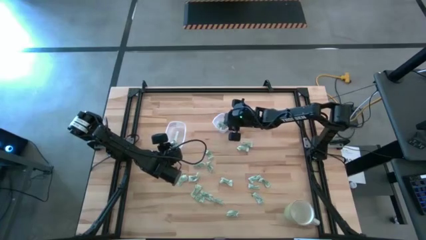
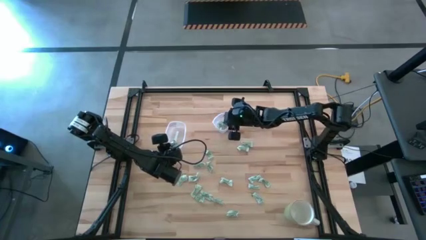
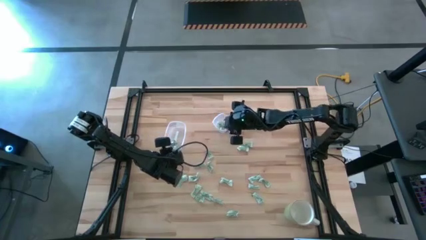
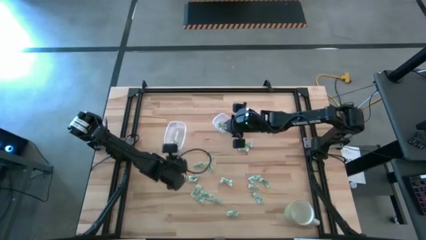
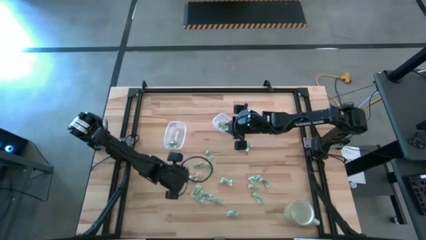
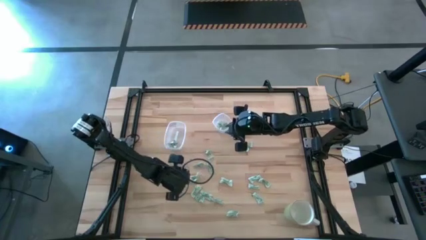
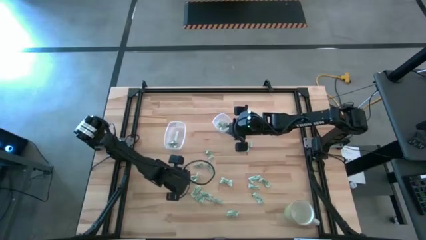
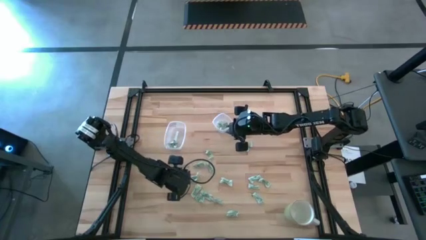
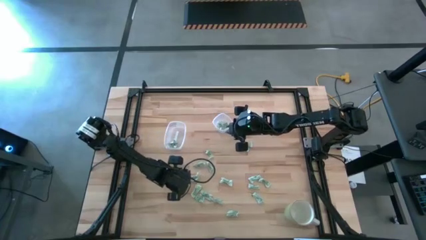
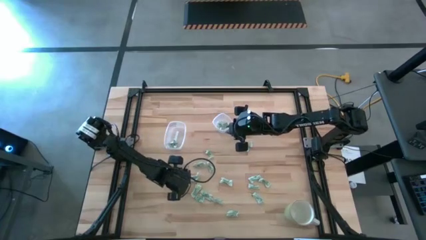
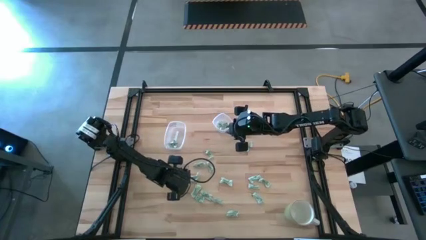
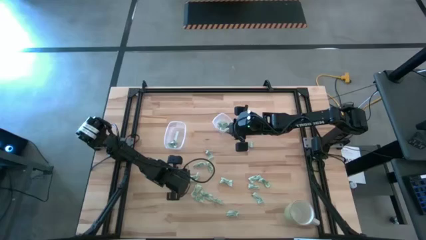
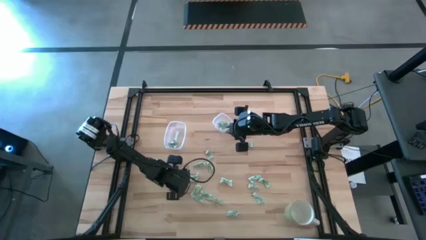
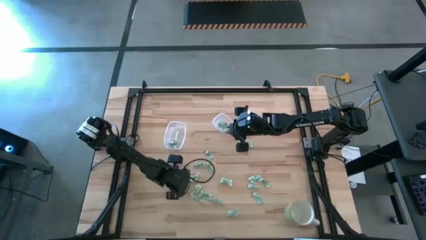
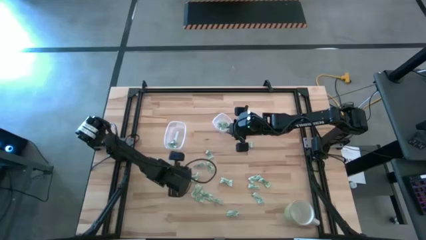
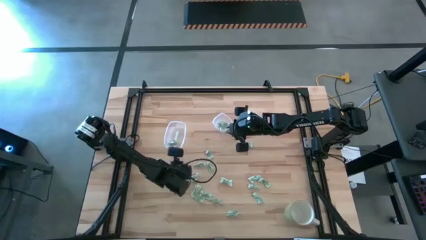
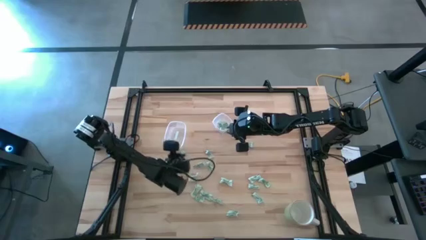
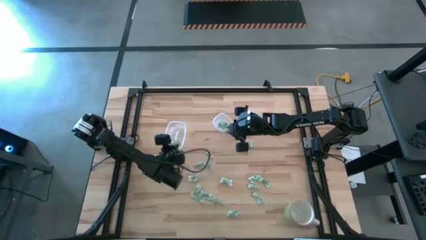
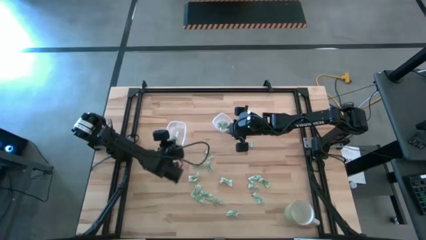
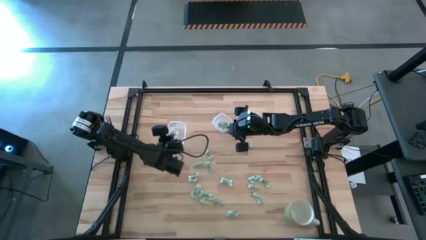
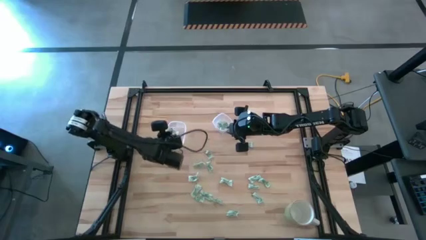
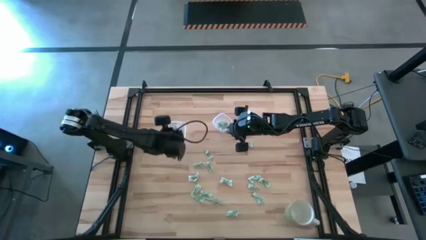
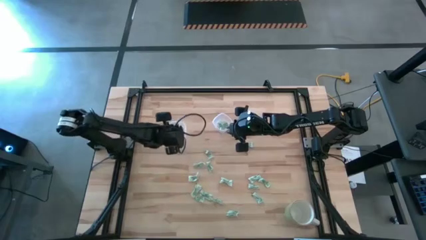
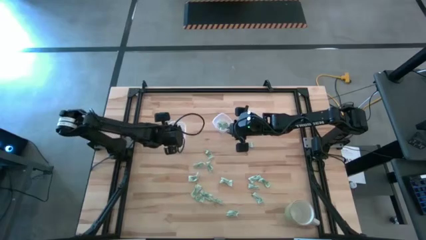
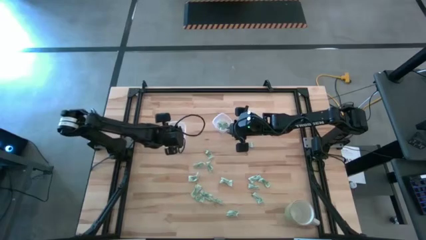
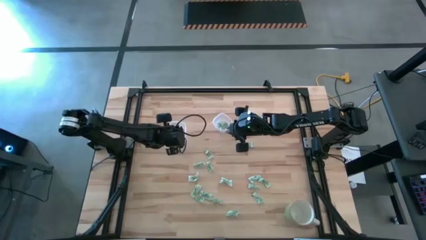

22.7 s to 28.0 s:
Task: Pick and place items into bin
Put the stevia packet into the large transparent container

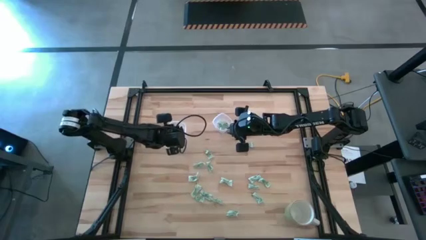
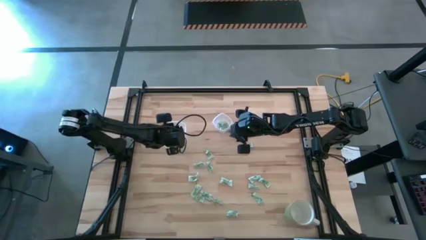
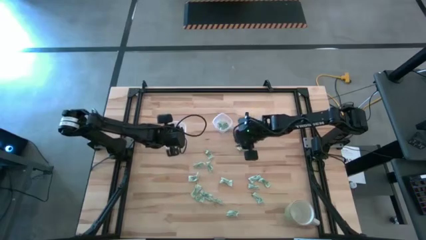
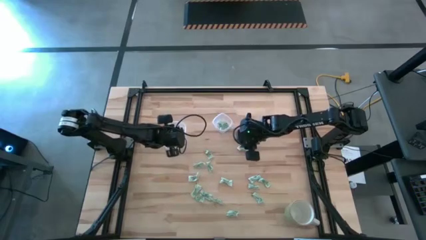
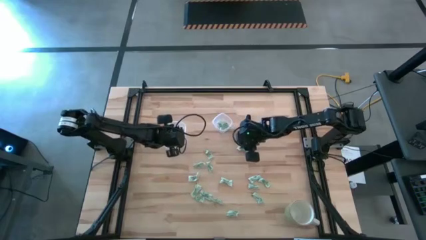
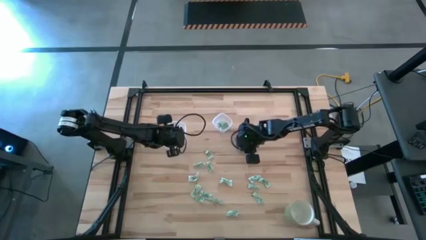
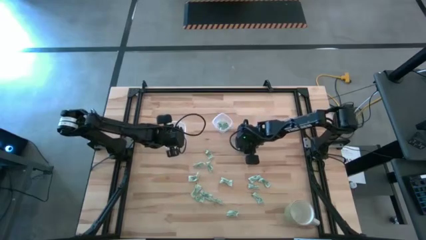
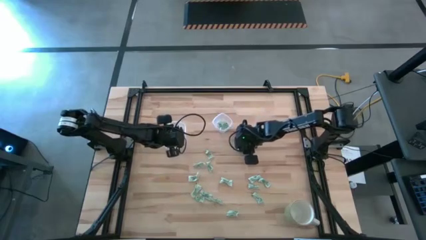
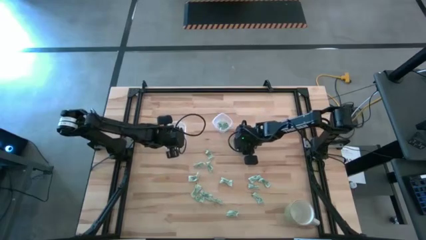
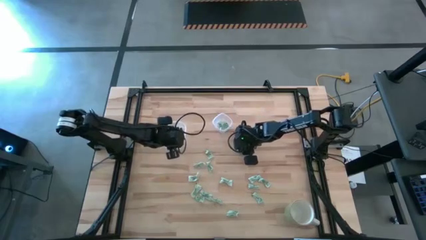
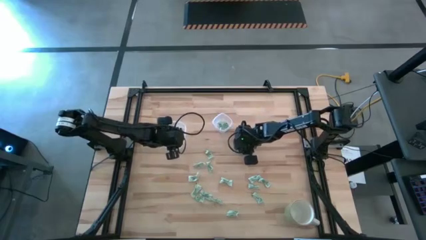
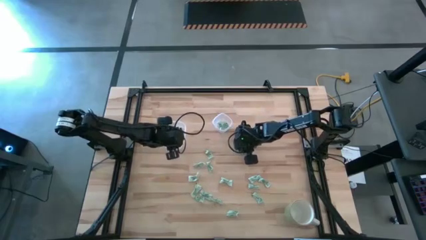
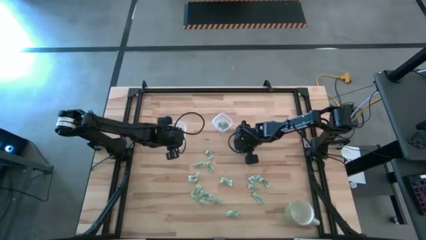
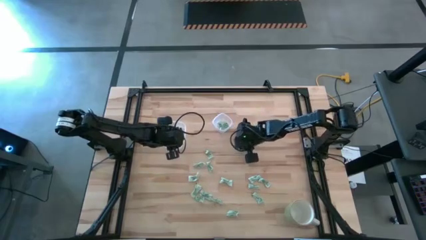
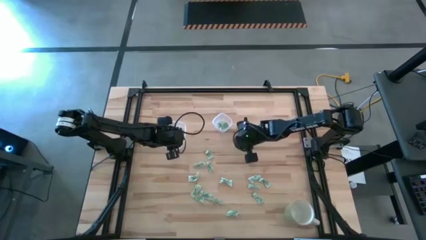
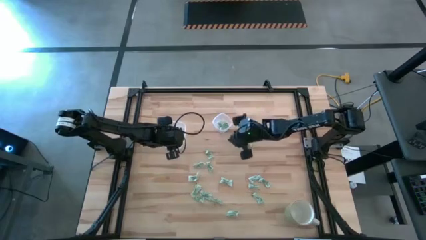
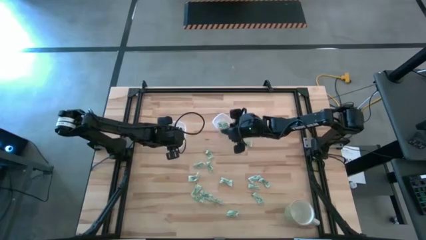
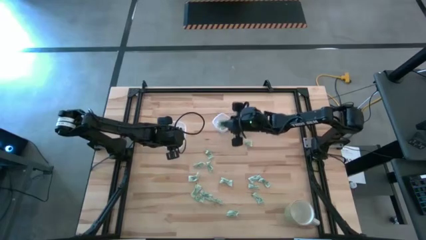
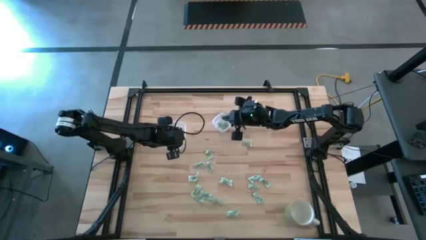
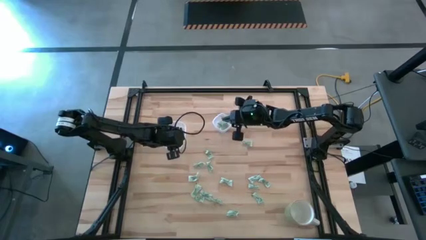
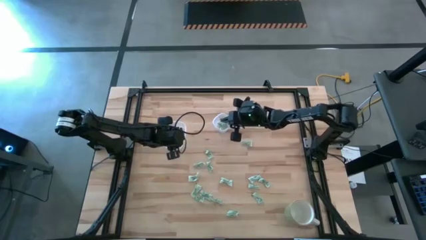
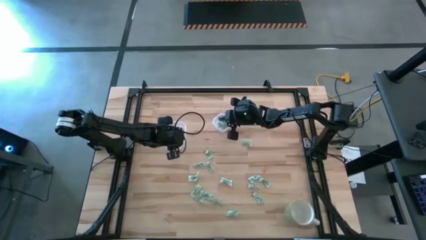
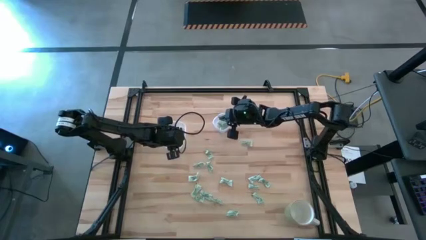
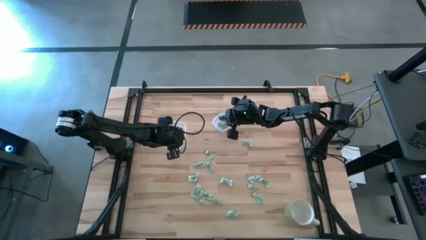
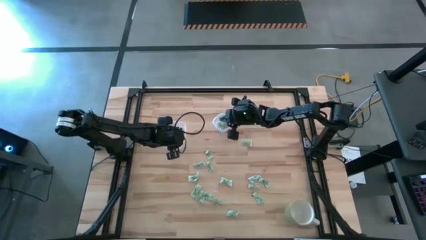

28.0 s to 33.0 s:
Put the stevia packet into the small transparent container

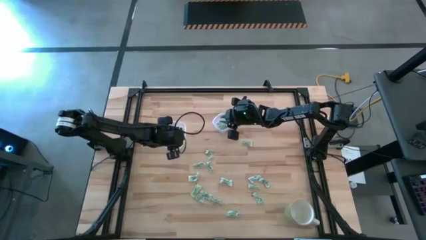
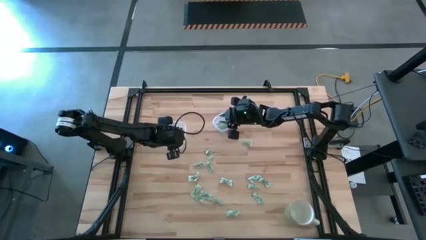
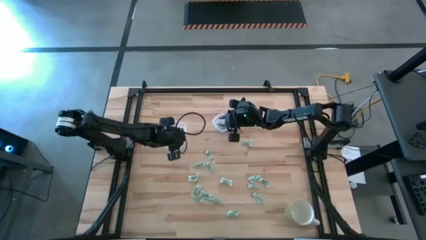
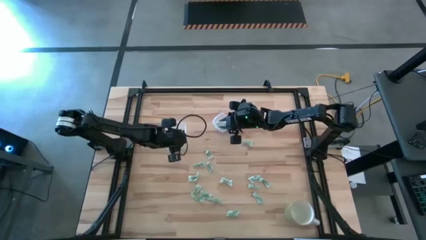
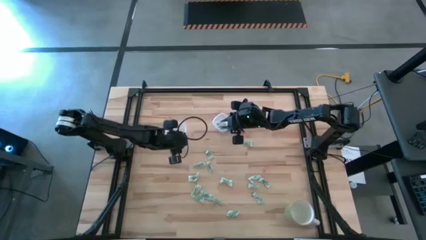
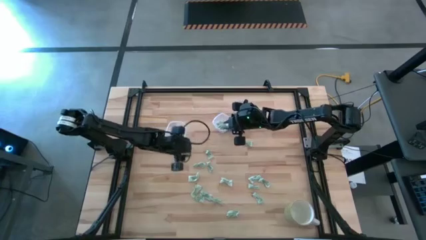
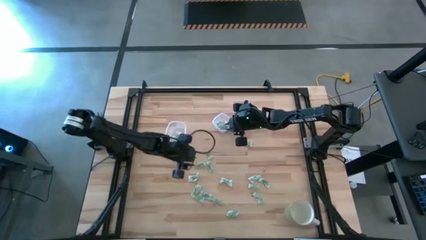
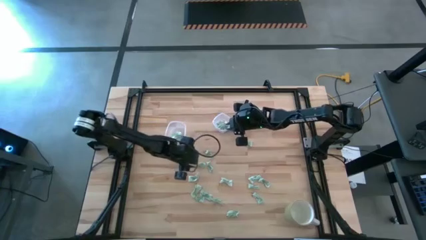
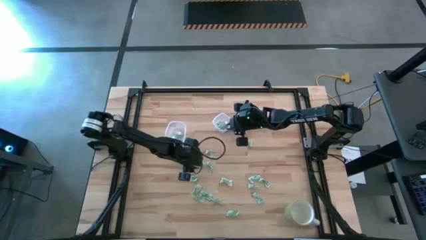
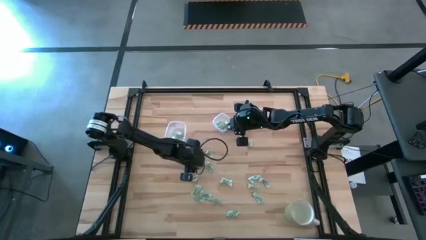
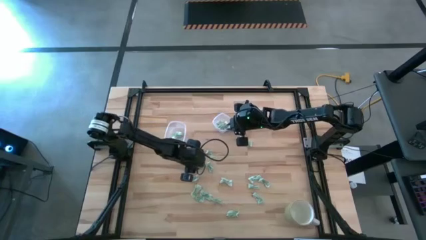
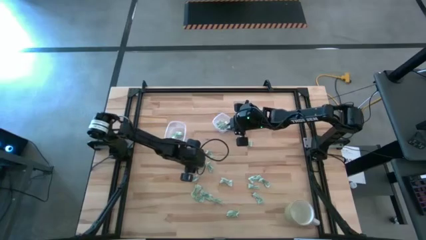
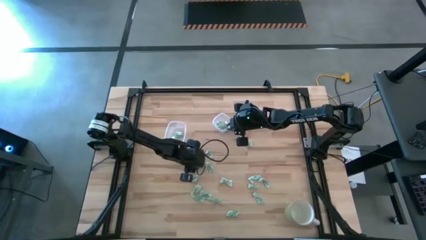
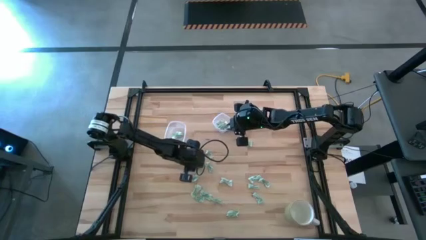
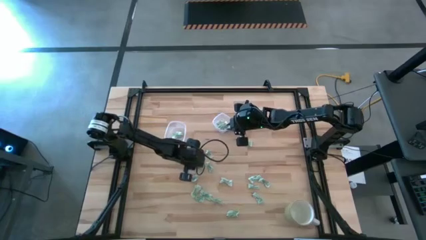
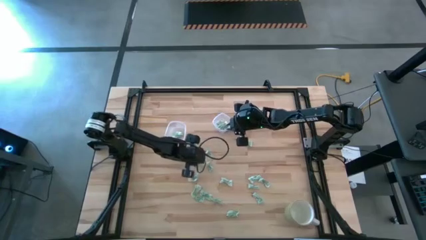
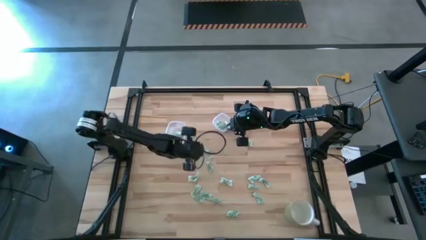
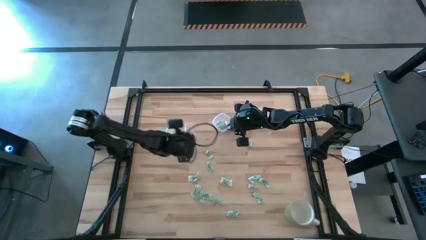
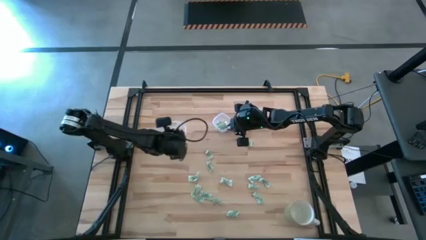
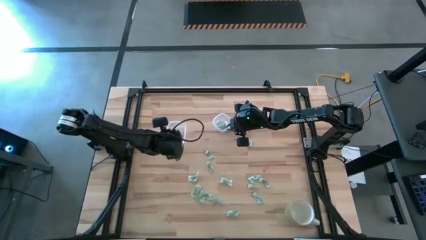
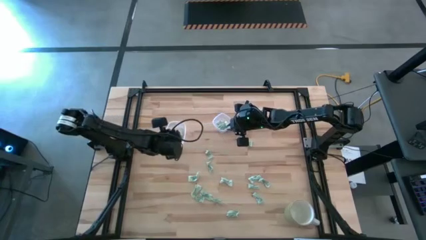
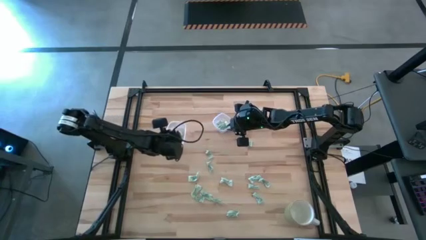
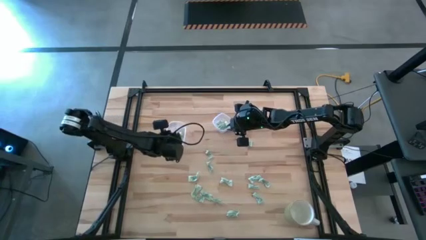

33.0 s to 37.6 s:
Put the stevia packet into the large transparent container

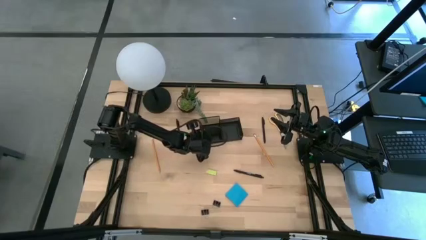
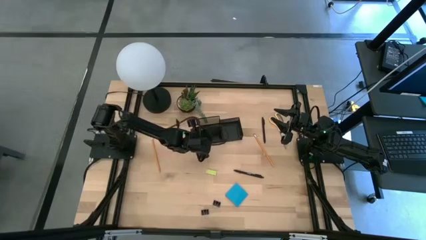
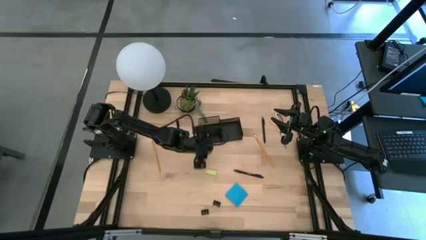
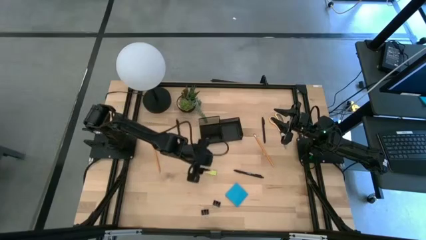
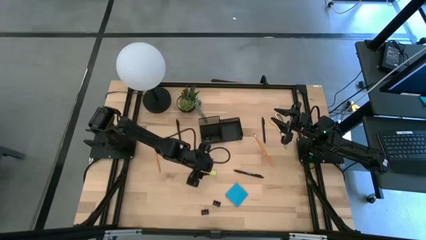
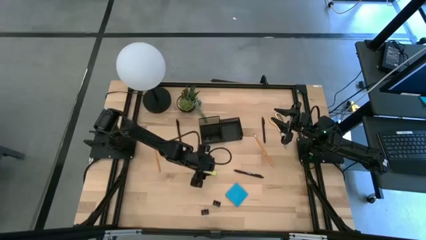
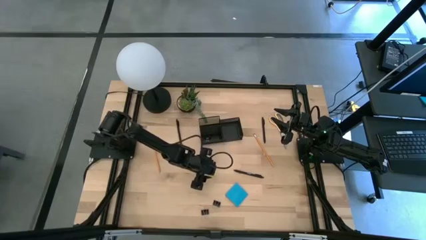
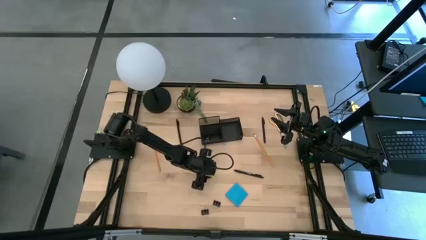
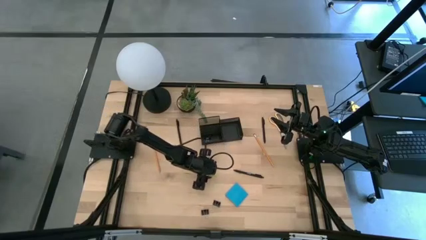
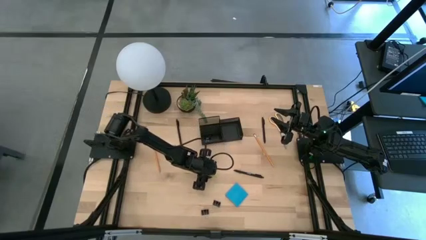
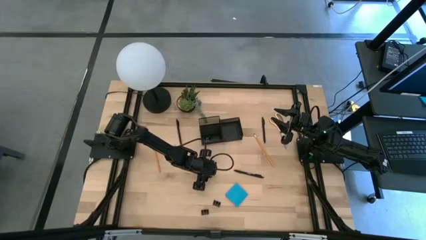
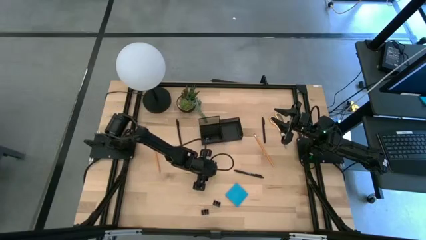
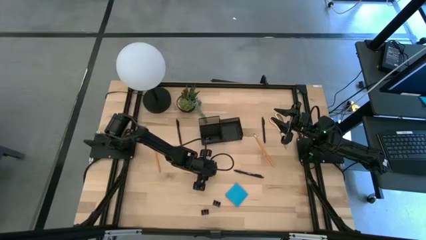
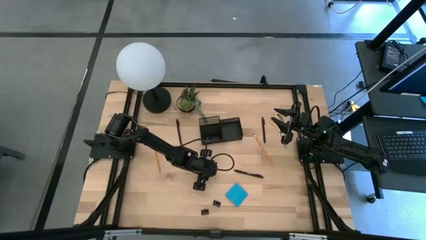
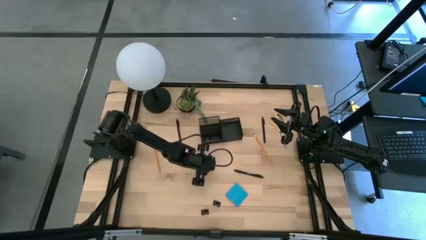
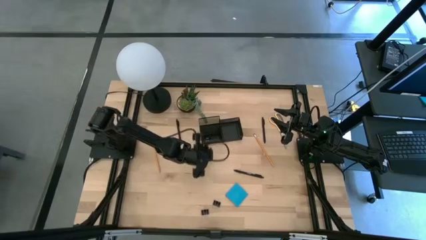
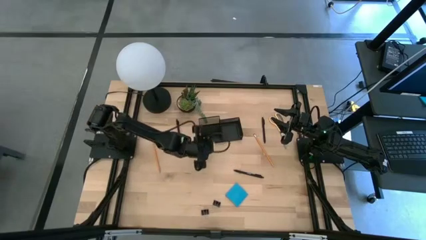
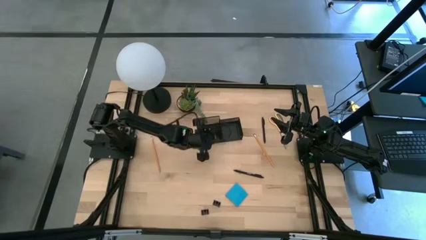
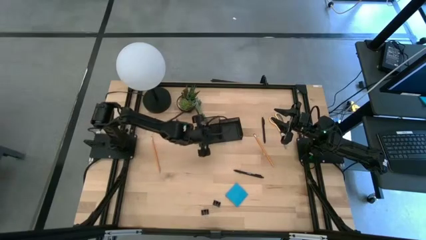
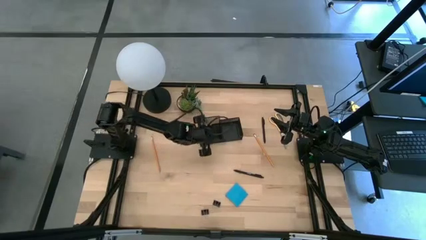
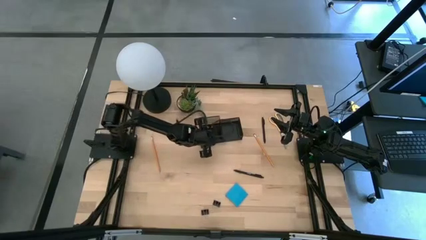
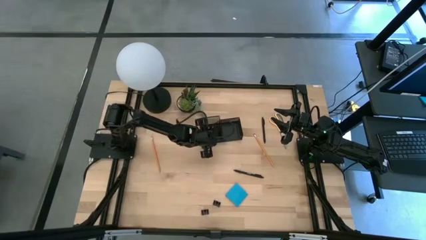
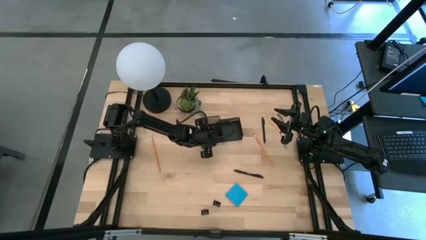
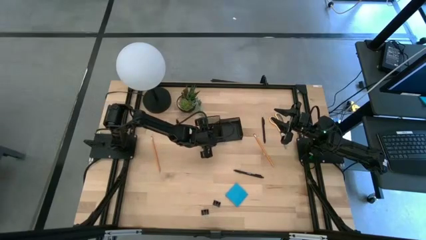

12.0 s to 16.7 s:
Task: Pick and place office supplies into organizer
Put the light green eraser into the desk organizer
